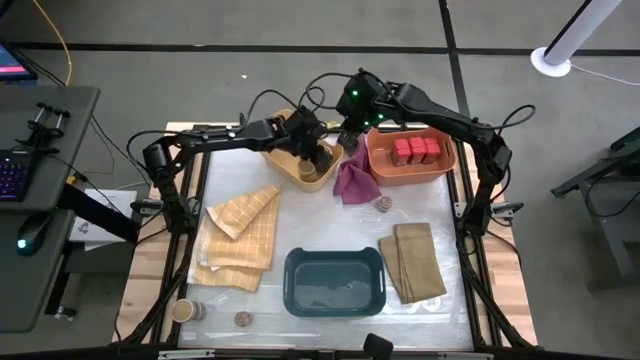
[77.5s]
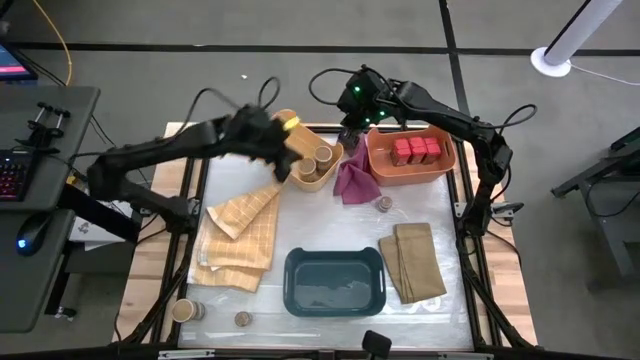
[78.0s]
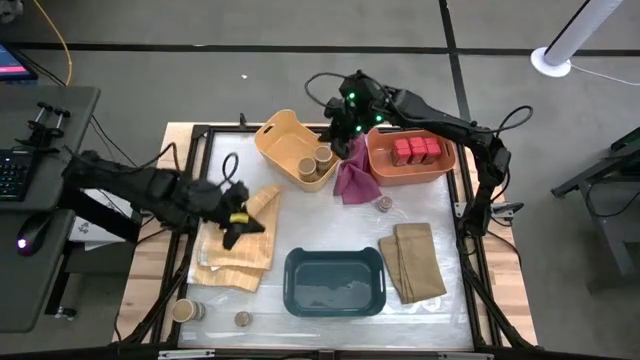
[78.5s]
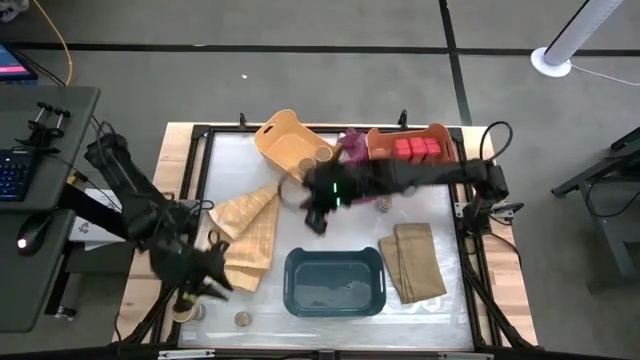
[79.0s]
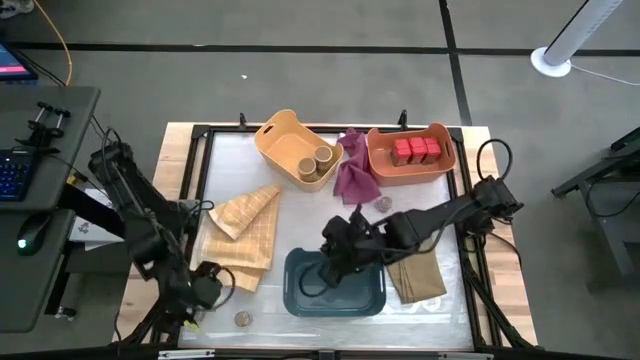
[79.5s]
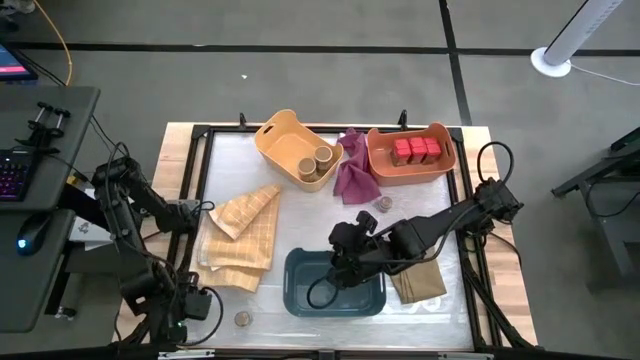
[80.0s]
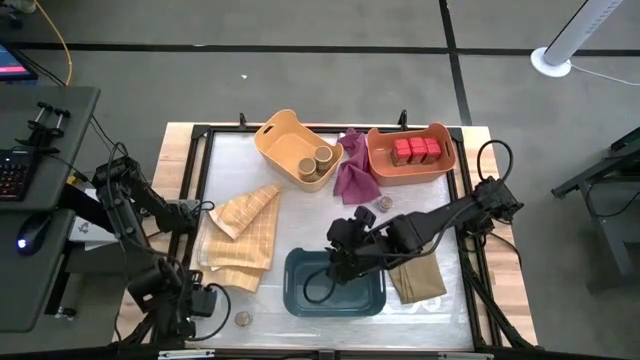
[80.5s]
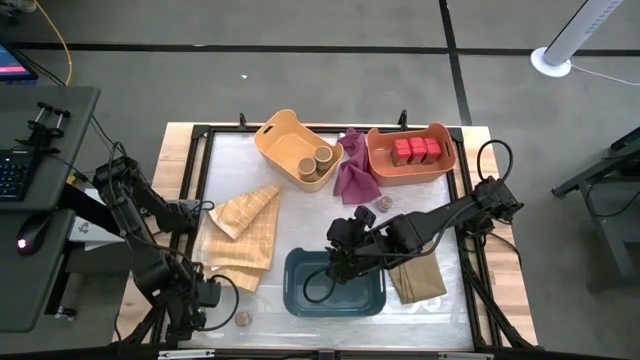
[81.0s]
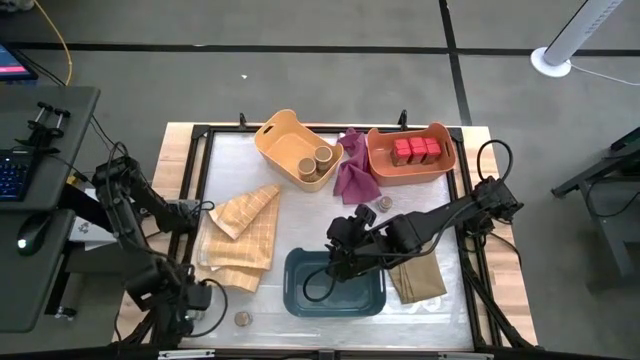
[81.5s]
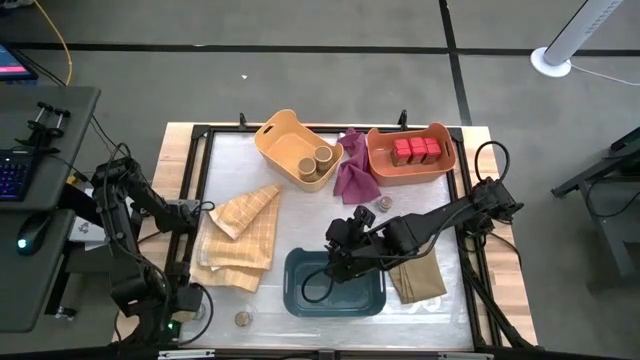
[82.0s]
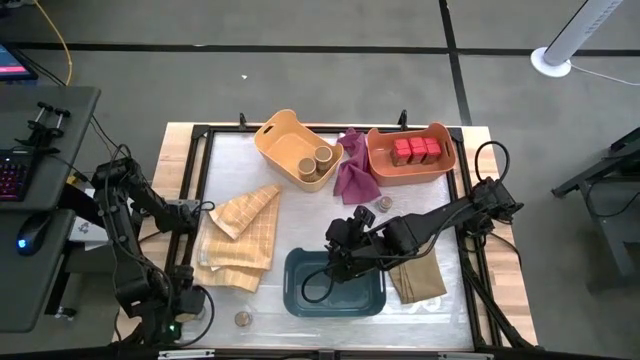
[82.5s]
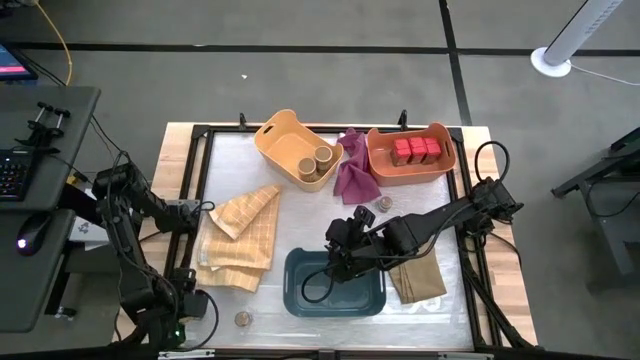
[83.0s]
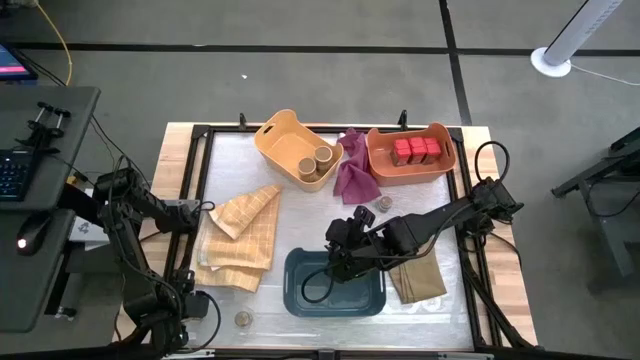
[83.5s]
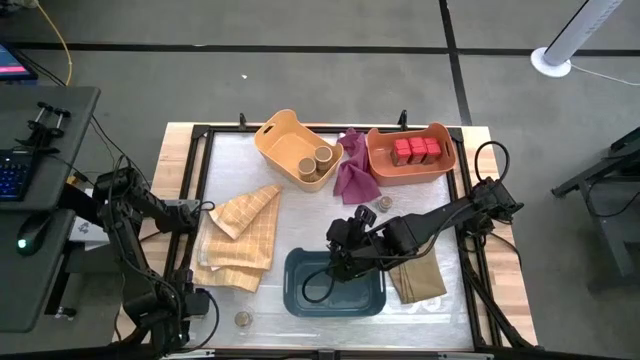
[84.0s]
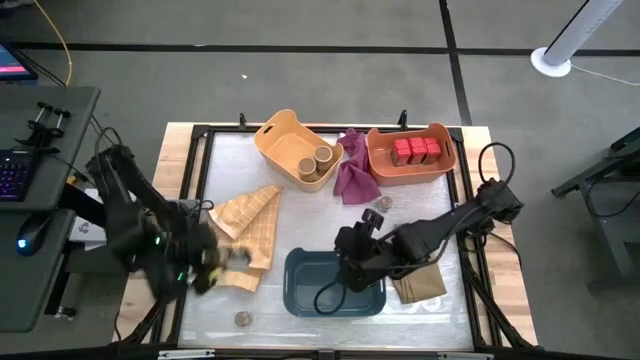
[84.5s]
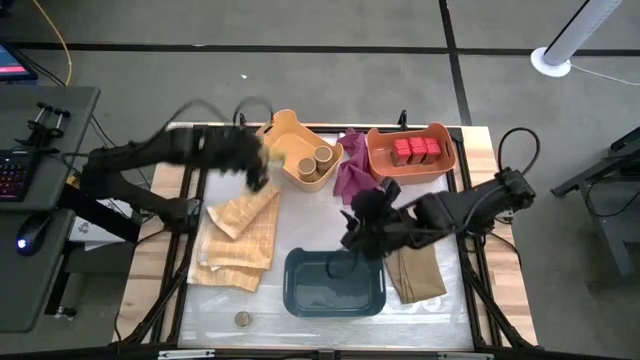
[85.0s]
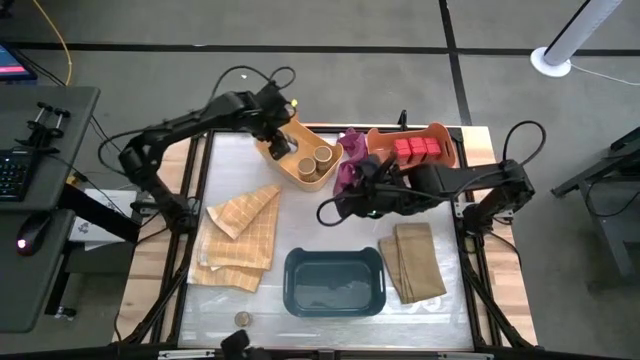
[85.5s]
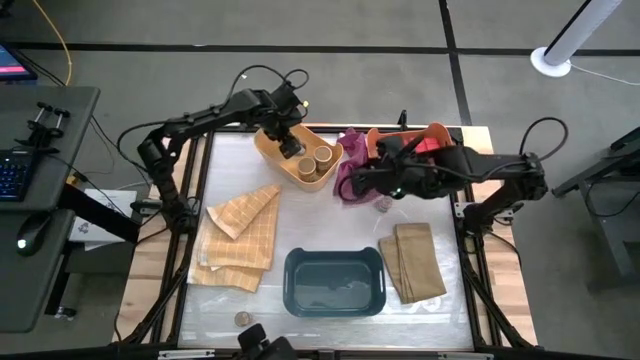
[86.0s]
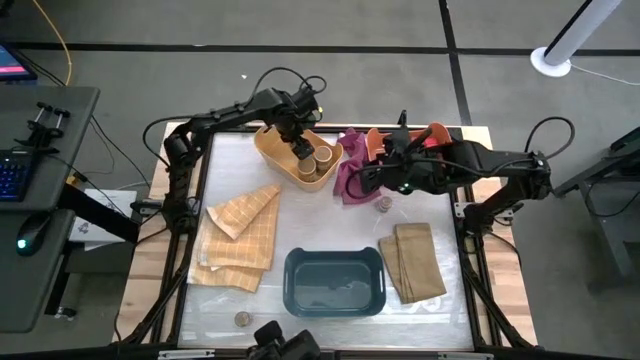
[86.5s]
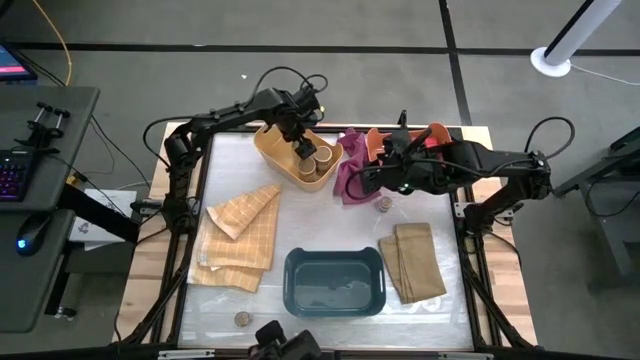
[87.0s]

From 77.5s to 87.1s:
Task: Sort spices by type
Put the brown seasoning bottle into the yellow bin

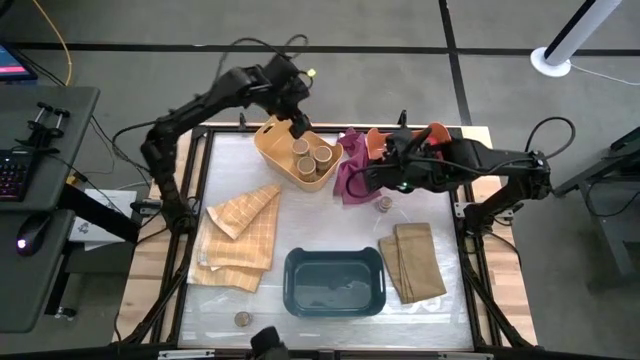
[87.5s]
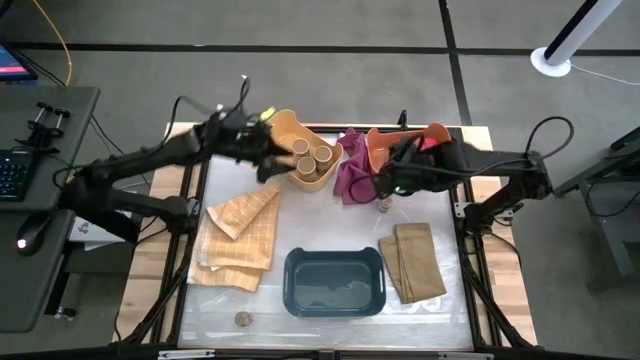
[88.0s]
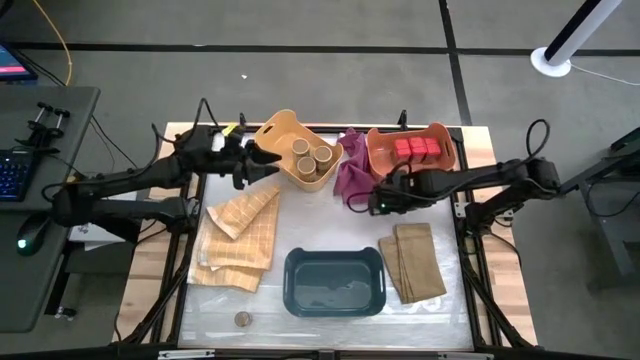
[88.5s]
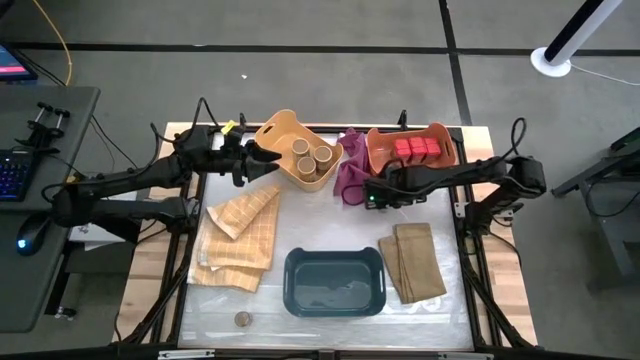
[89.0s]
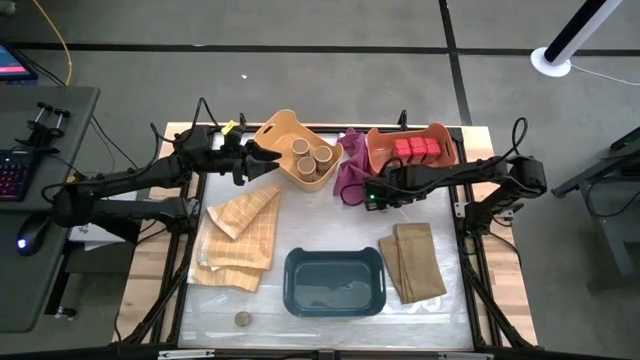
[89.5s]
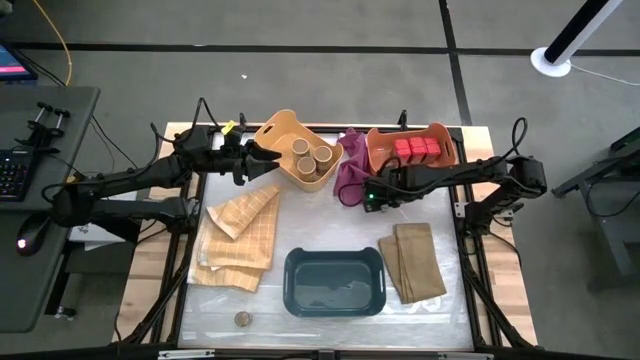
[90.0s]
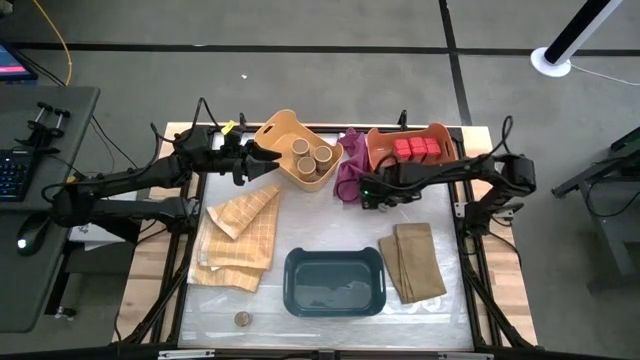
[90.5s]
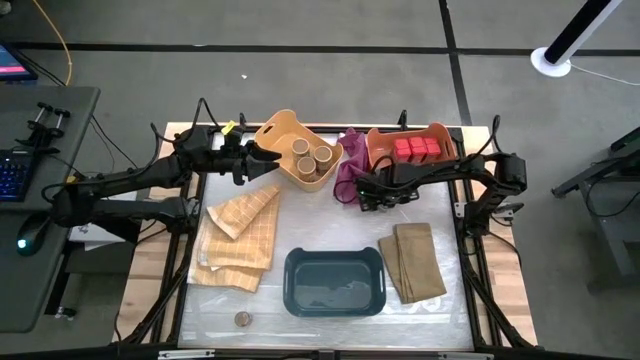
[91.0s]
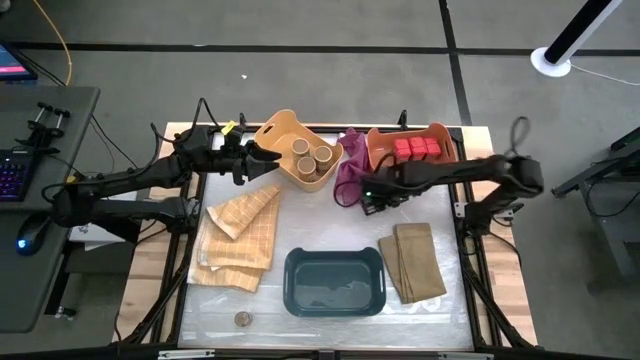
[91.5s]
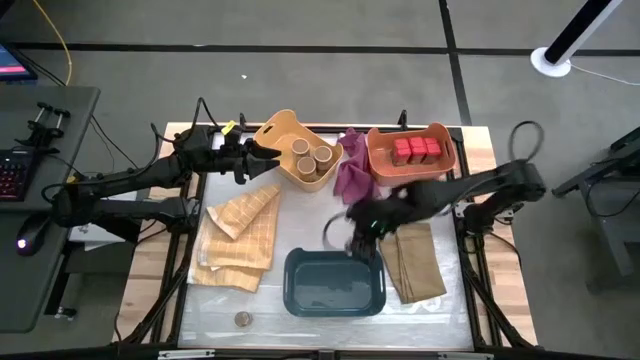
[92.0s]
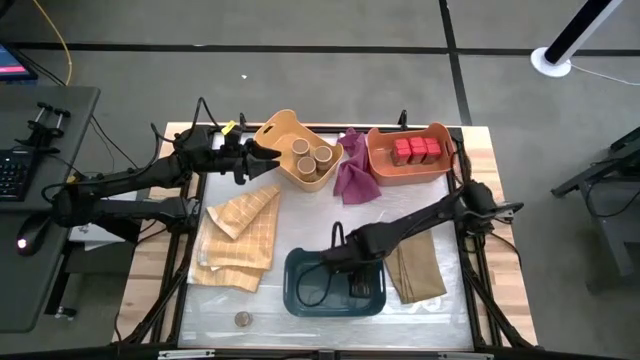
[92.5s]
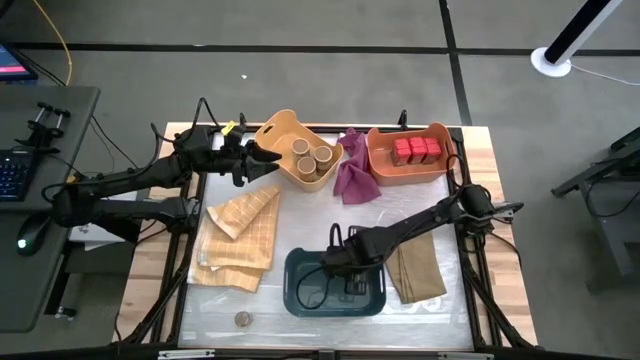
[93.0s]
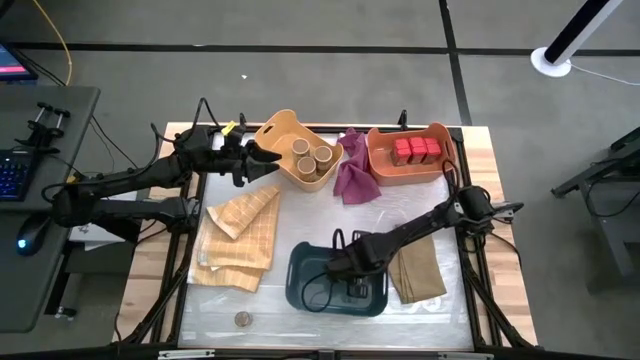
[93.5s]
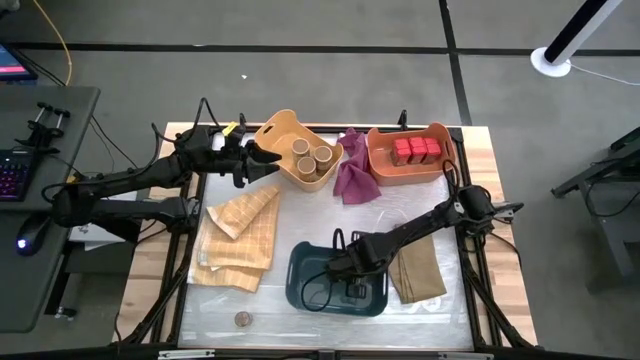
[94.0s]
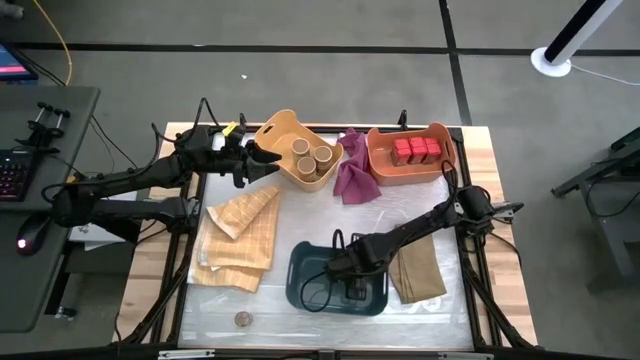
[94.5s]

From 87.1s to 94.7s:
Put the top transparent seasoning bottle into the blue bin

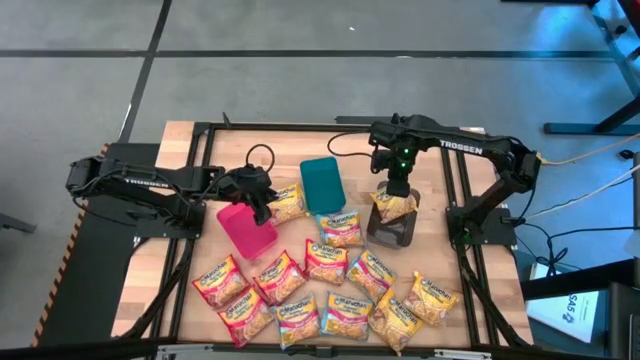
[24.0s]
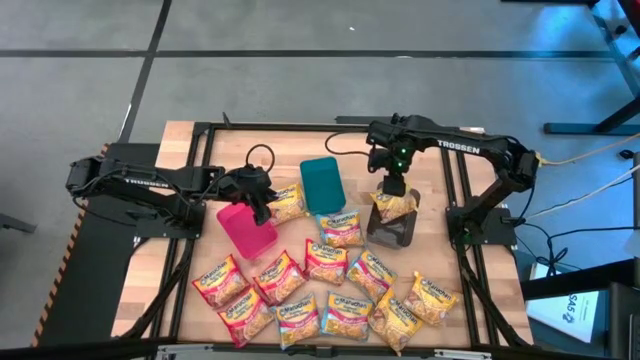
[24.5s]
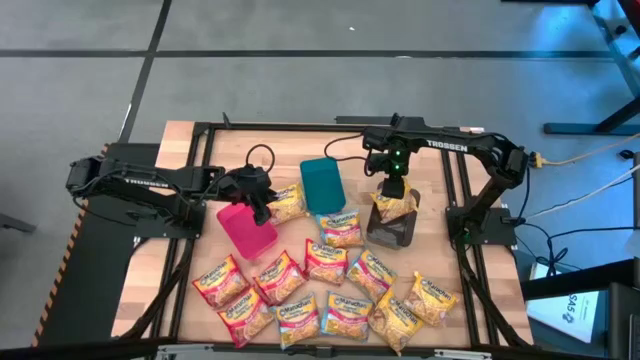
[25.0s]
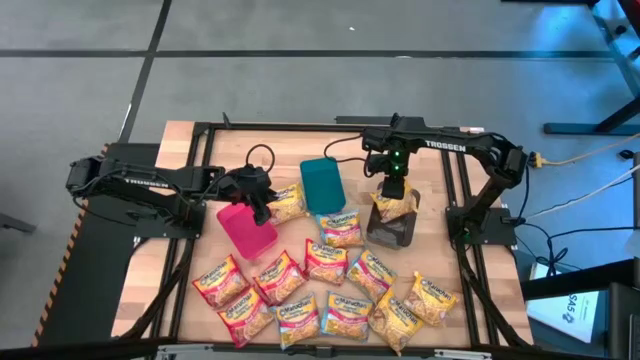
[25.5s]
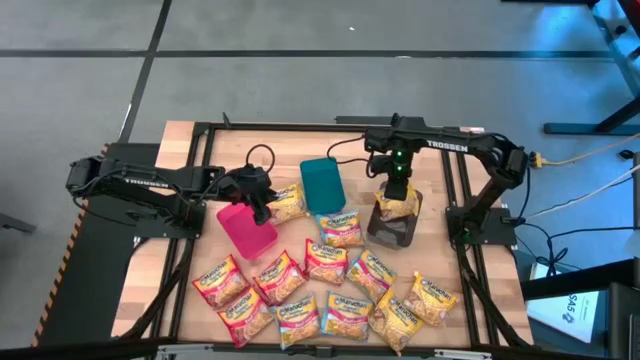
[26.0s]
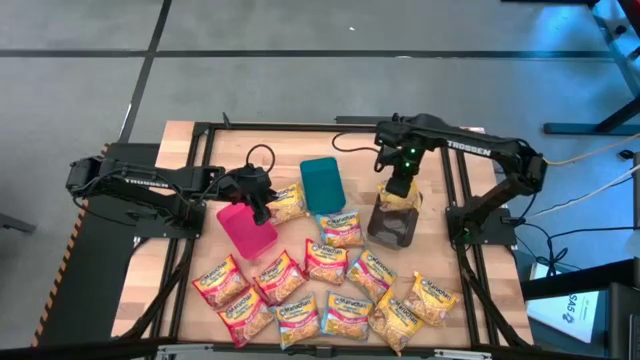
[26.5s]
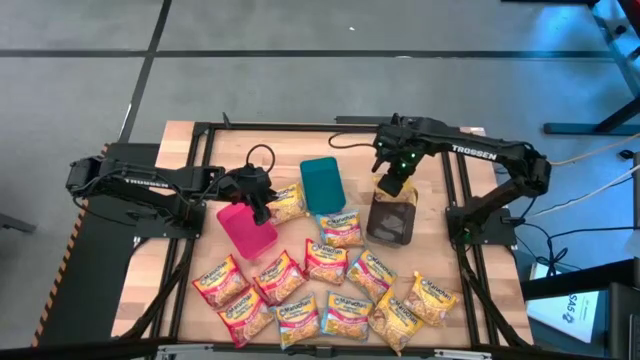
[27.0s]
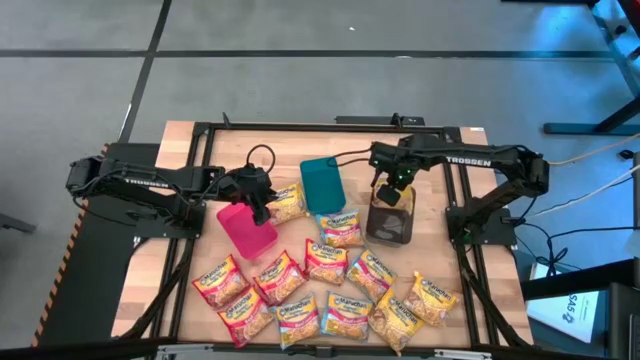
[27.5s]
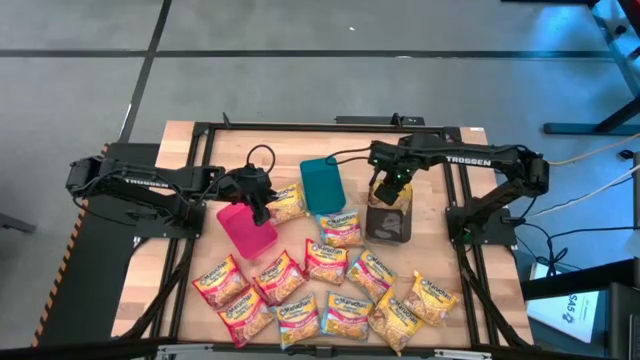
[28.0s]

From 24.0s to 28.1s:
Task: Sort Maruchan noodles
Put the yellow noodle pack into the black bin

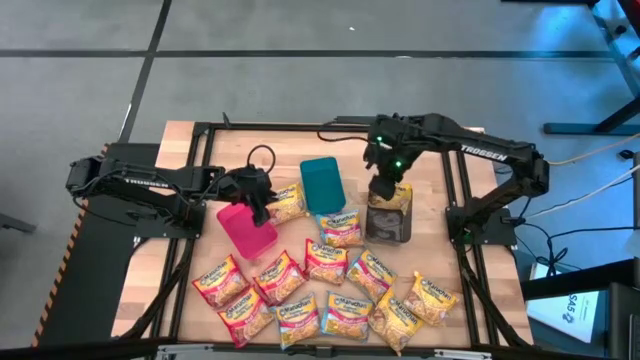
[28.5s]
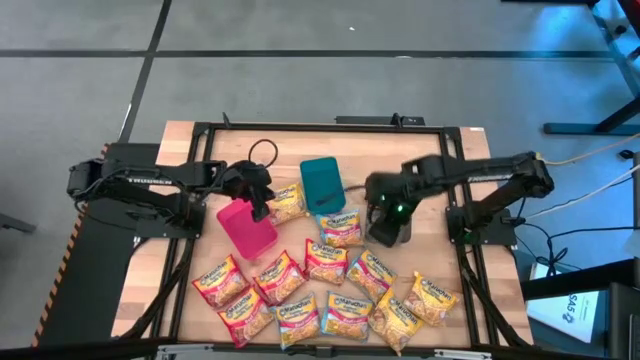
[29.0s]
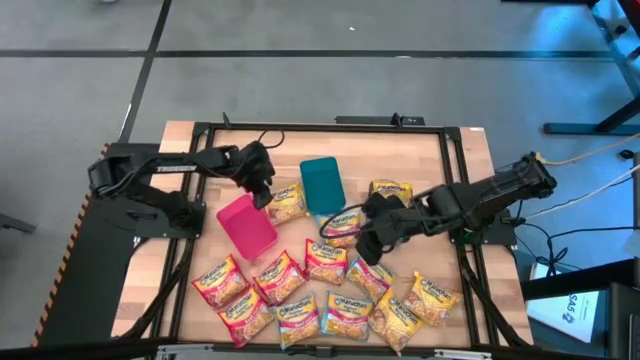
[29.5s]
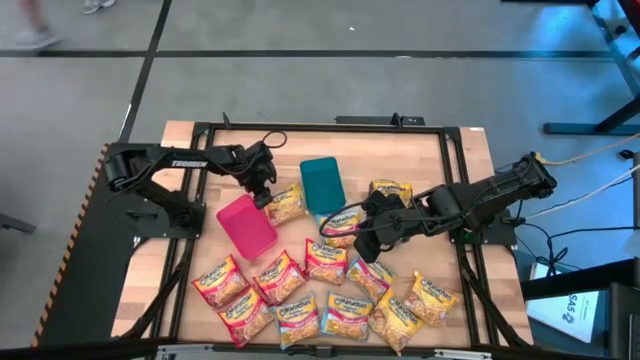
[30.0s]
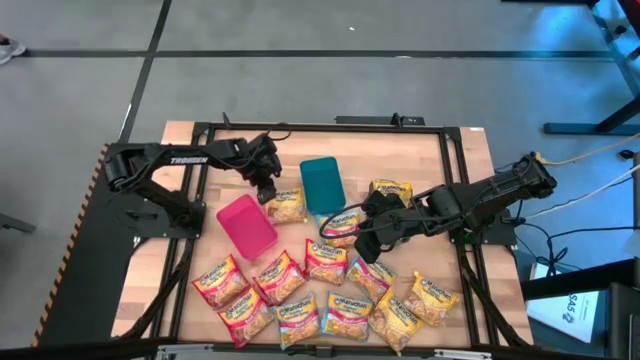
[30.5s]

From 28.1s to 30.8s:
Put the yellow noodle pack into the black bin
